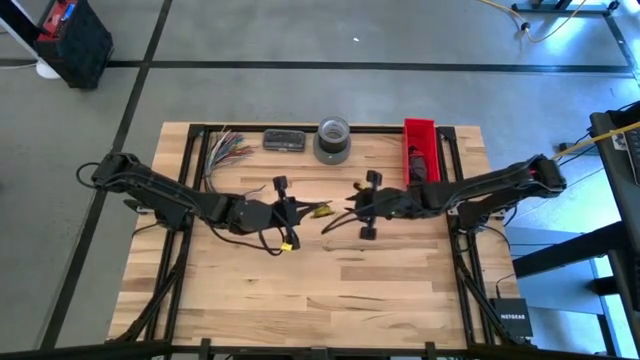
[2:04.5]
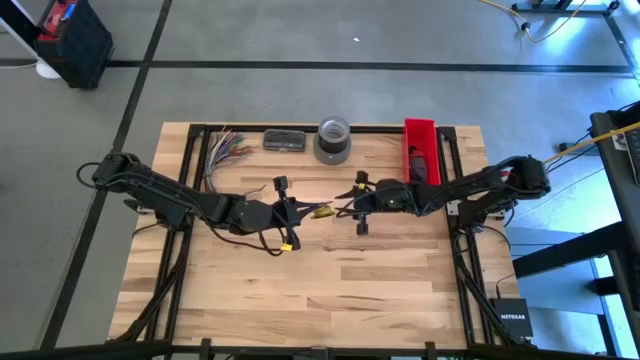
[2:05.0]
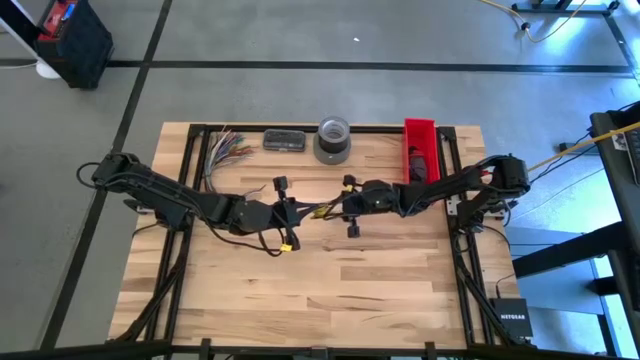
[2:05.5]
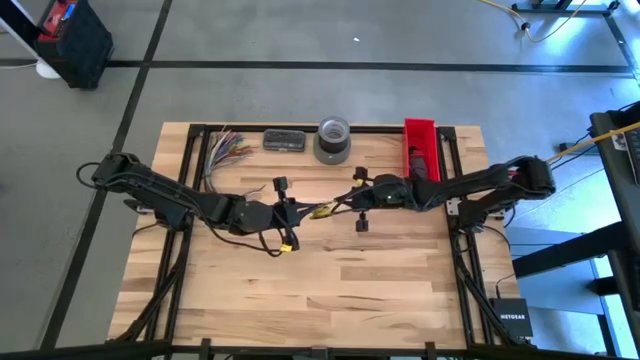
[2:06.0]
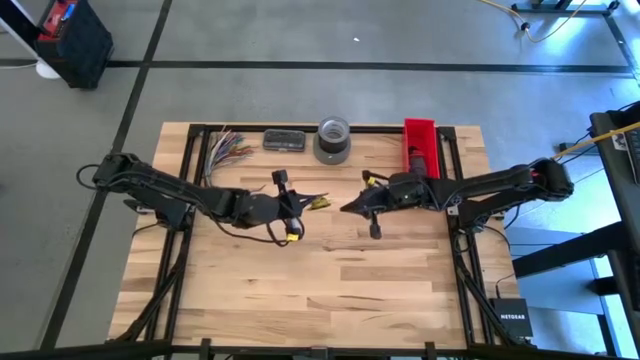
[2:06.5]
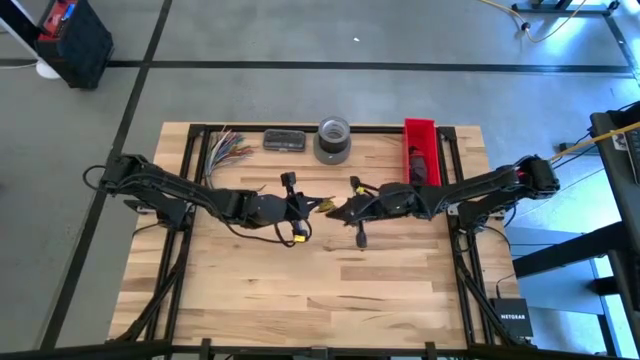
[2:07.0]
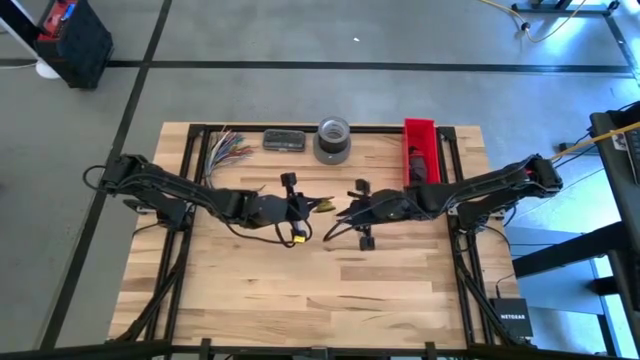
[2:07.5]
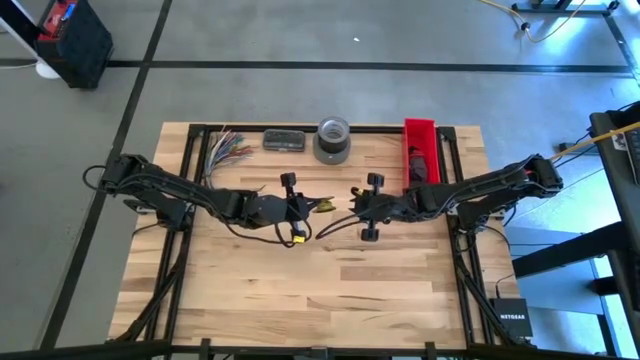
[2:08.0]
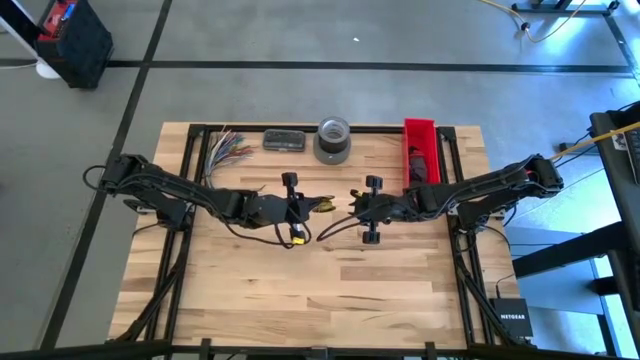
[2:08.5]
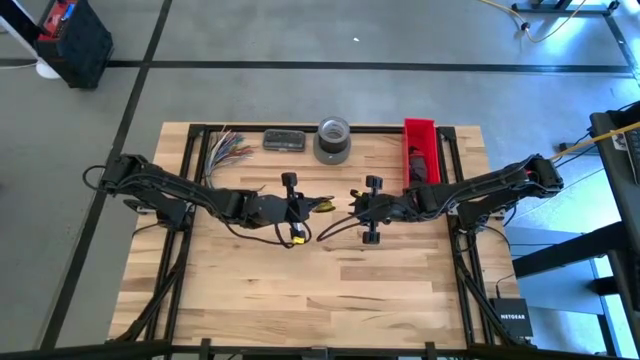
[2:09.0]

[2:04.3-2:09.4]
Task: Coil cords
Coil the yellow wire into the black spool

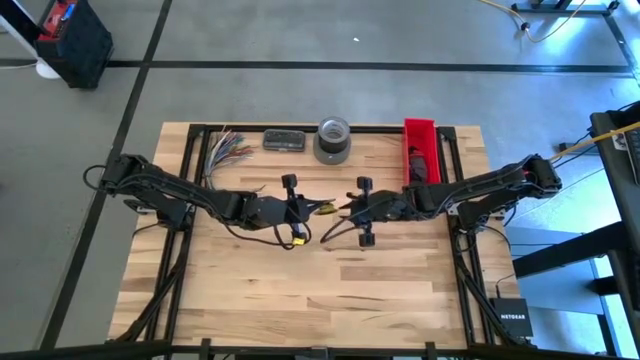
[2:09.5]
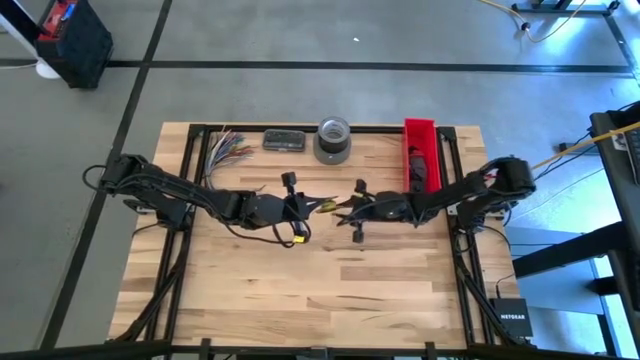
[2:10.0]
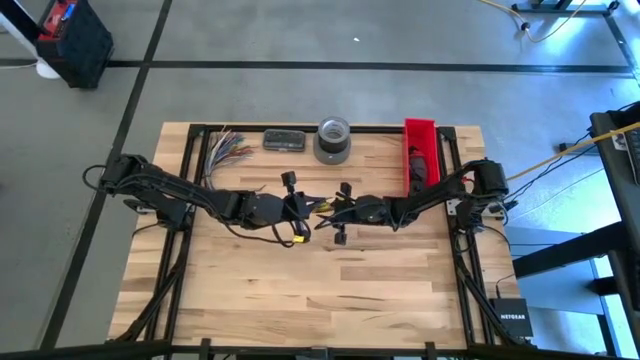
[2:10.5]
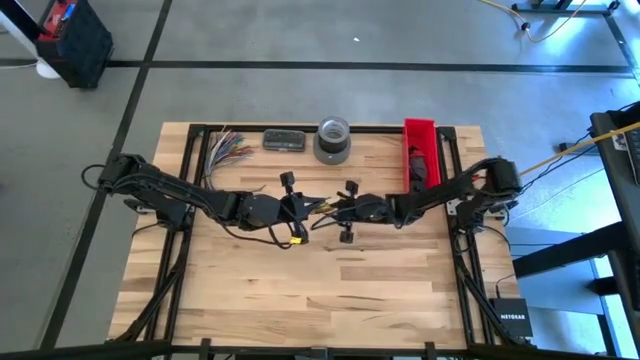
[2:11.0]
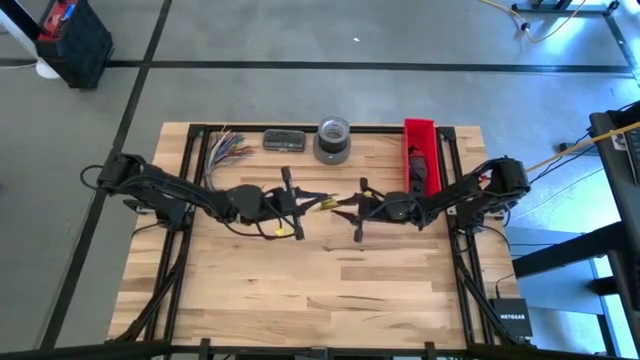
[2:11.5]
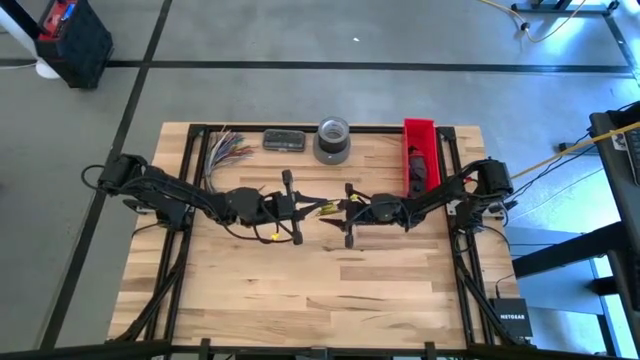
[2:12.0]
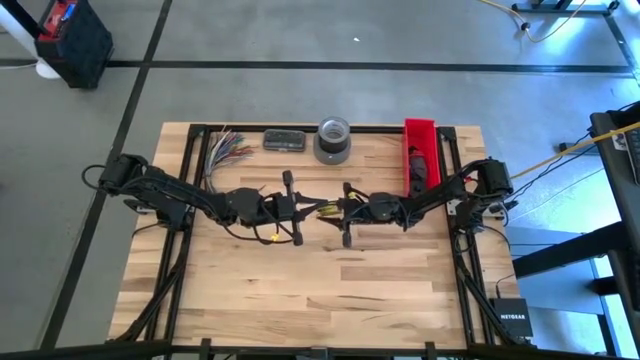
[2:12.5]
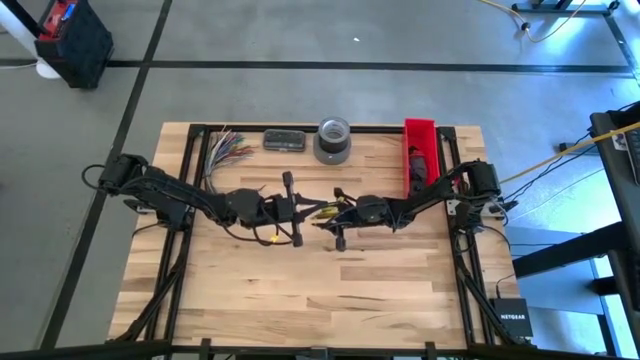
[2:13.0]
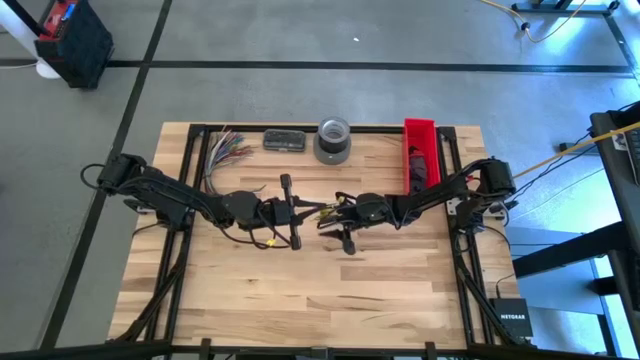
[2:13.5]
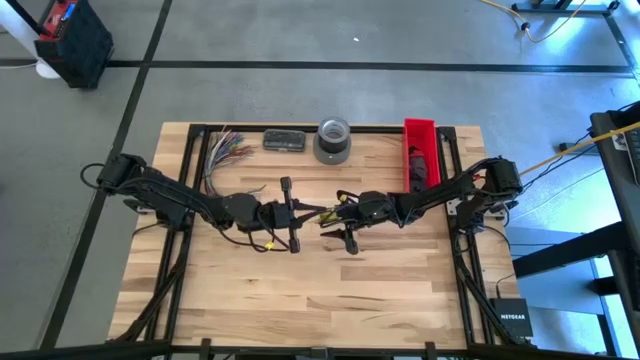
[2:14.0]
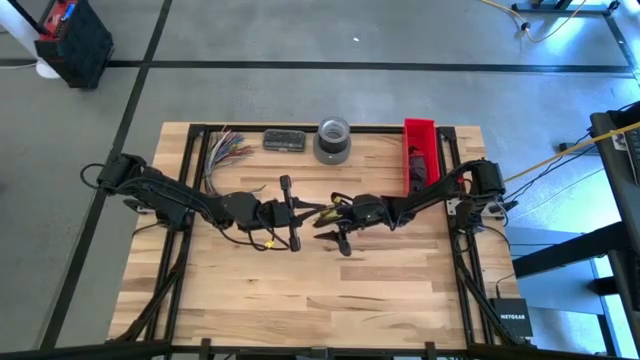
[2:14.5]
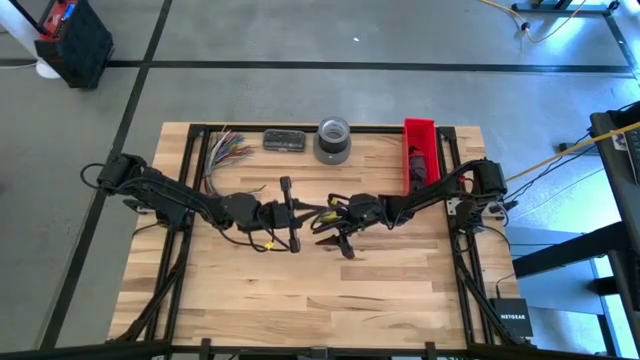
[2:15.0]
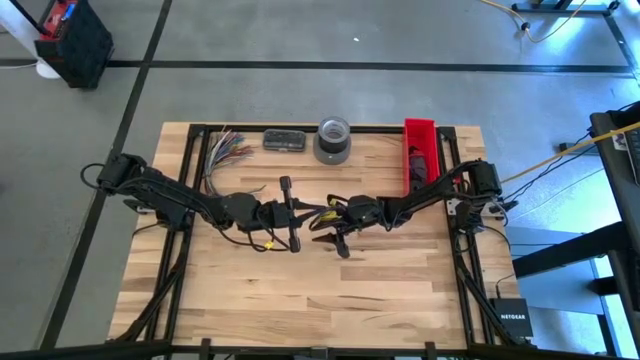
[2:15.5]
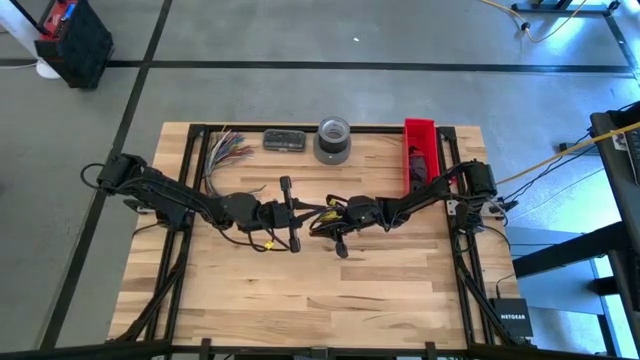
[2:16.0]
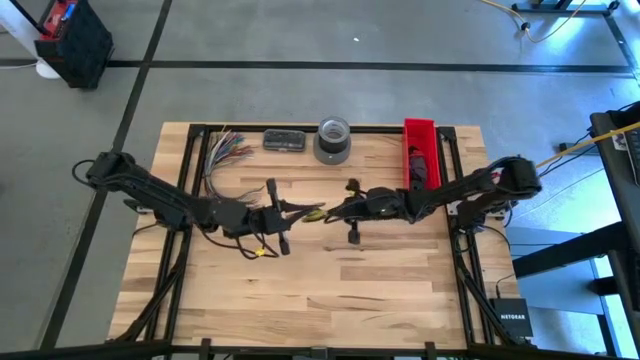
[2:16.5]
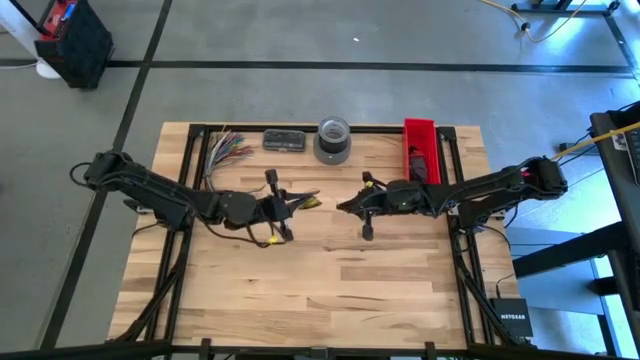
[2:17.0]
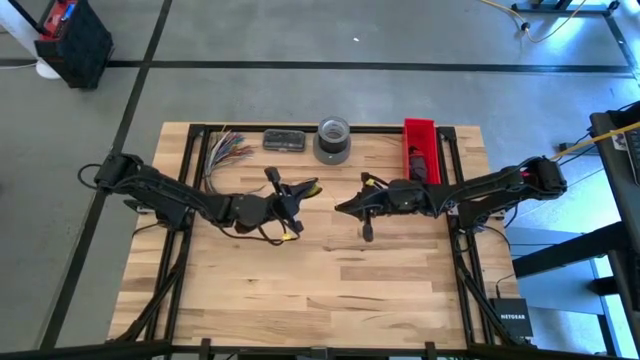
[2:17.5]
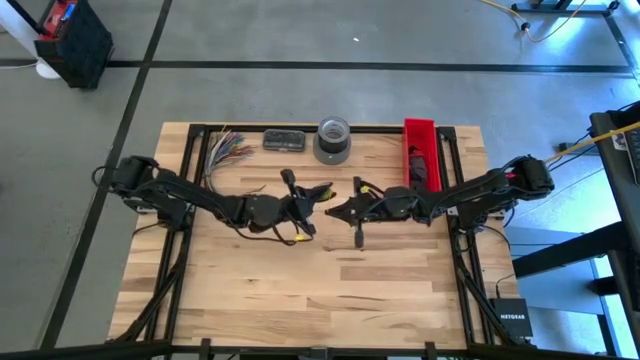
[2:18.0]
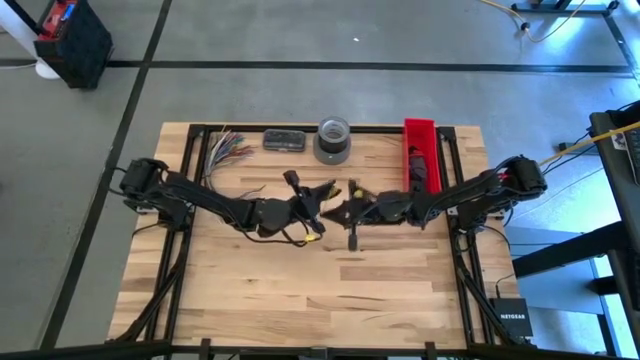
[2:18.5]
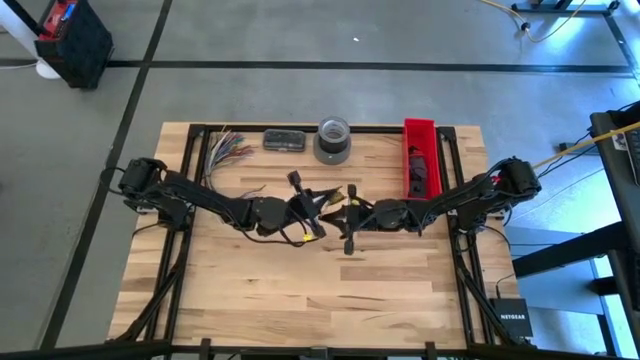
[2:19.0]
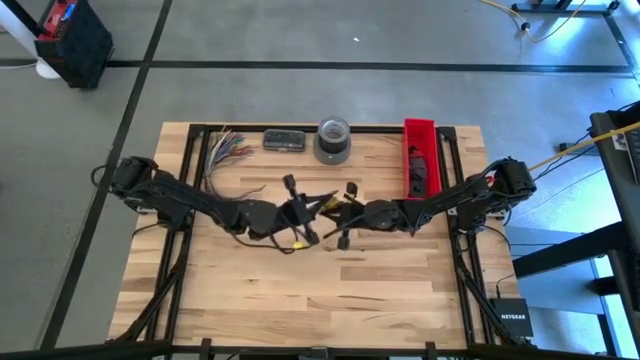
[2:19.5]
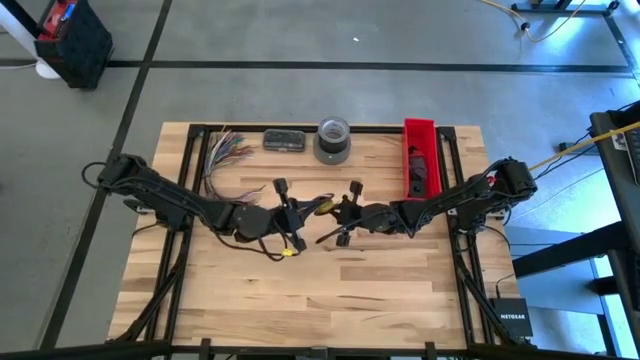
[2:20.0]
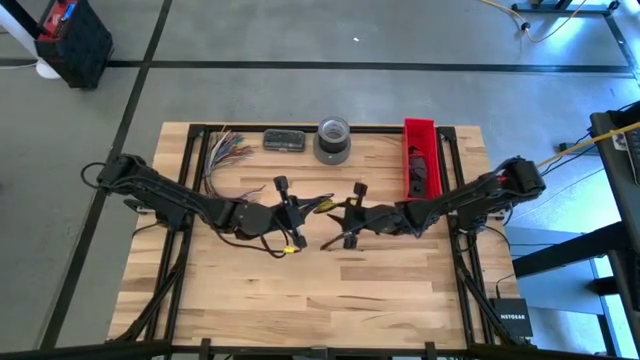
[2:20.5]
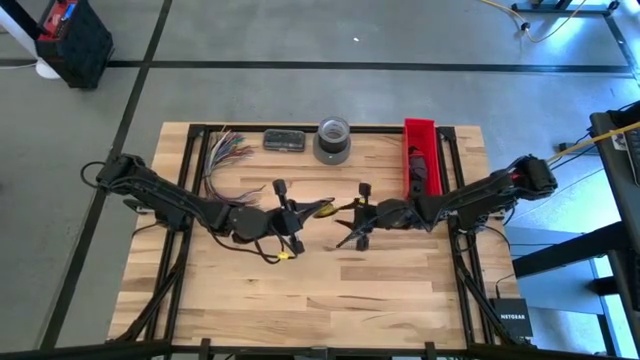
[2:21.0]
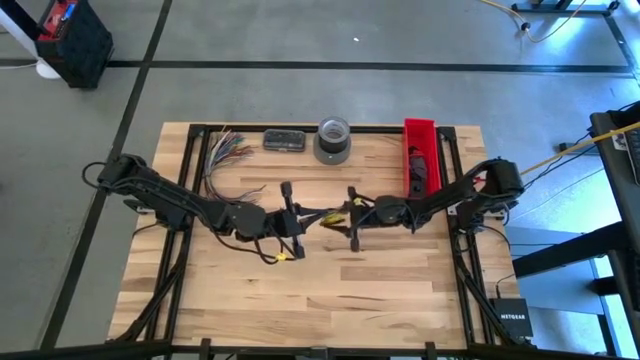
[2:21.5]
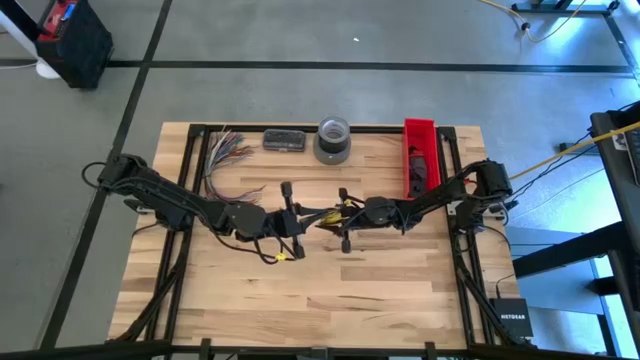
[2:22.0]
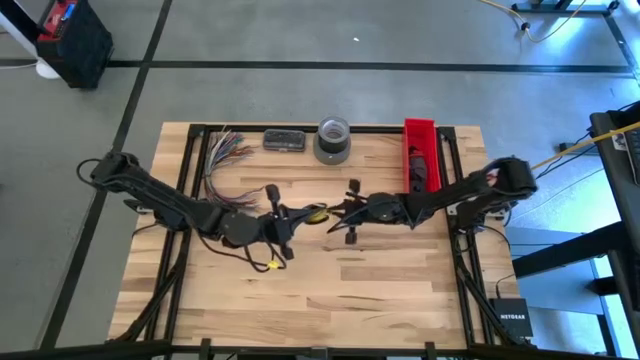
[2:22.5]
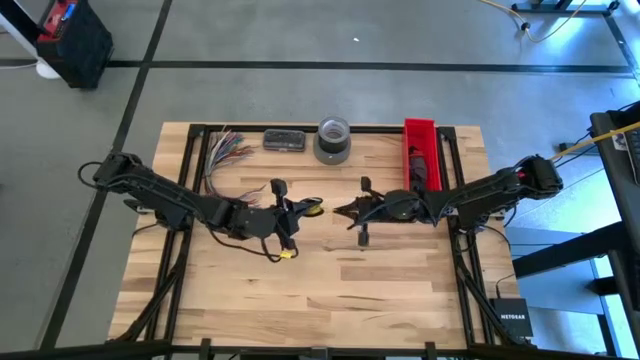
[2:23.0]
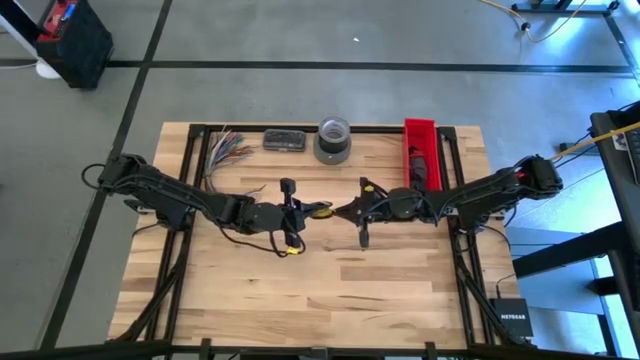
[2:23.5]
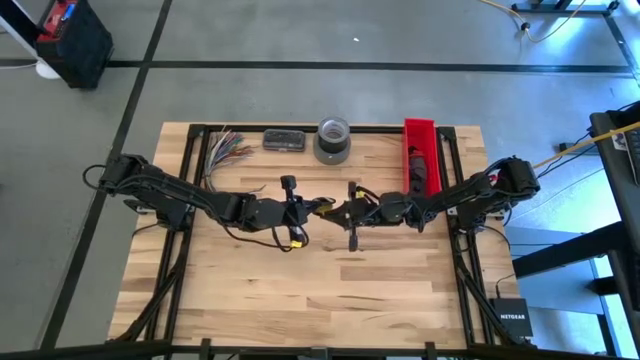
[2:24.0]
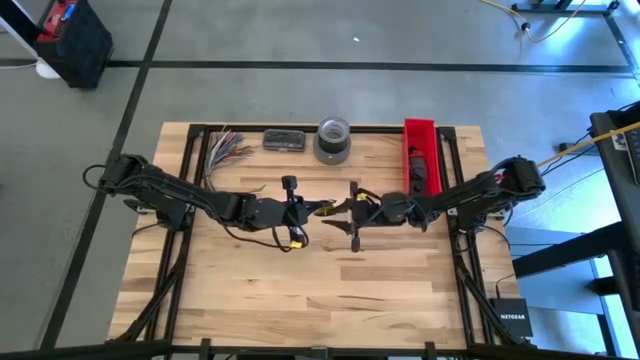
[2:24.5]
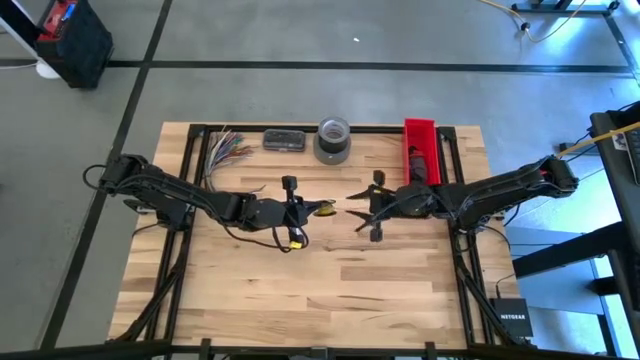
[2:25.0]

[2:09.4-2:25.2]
Coil the yellow wire into the black spool

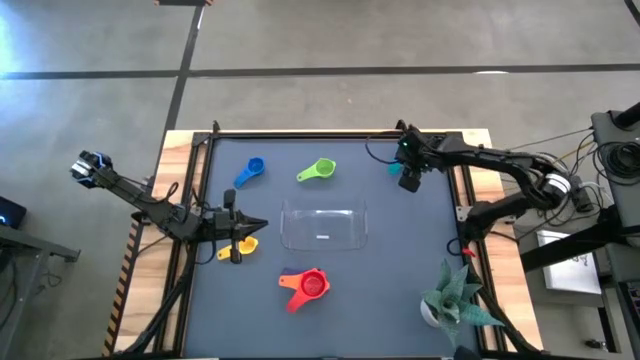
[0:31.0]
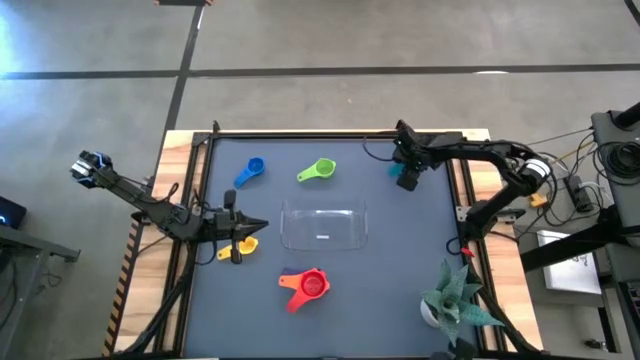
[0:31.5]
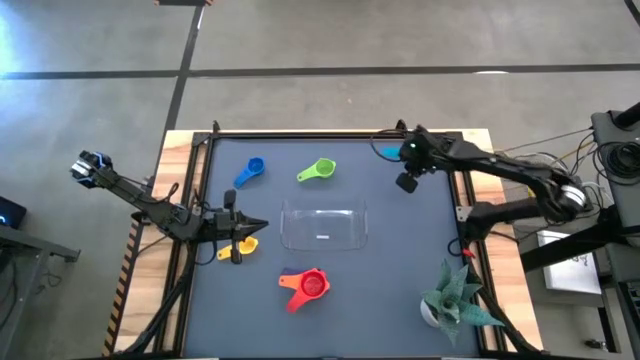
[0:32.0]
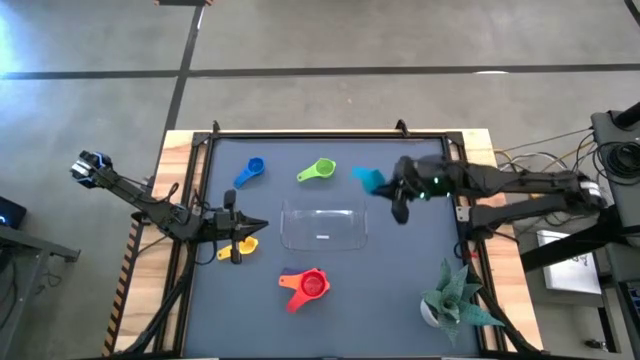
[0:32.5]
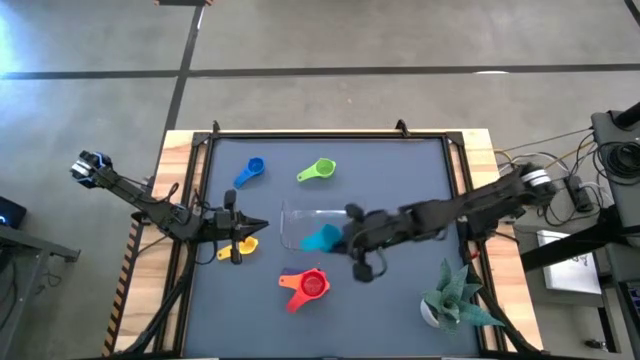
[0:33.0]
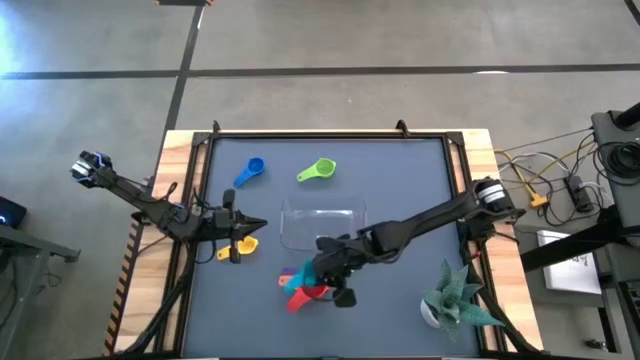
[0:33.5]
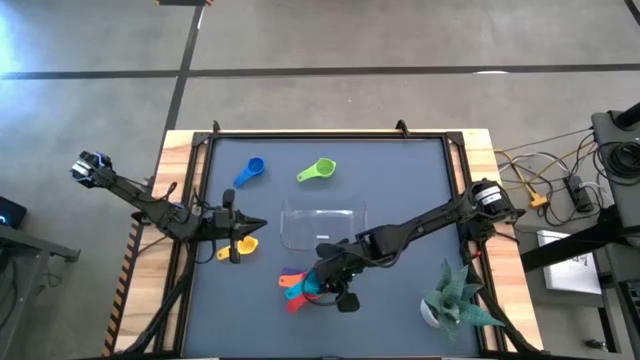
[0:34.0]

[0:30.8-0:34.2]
Task: Nest measuring cups in basket
Stack the light blue measuring cup on top of the red measuring cup
